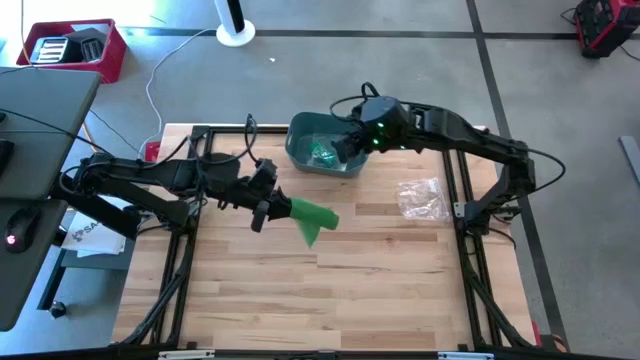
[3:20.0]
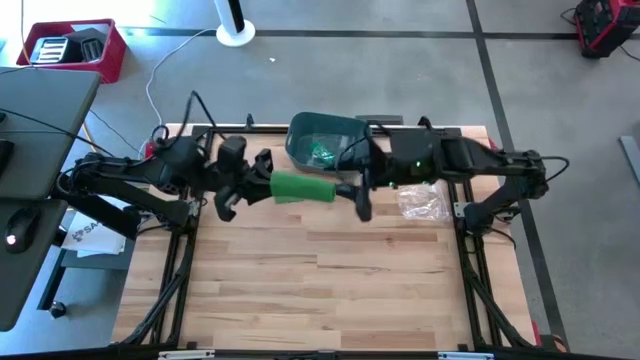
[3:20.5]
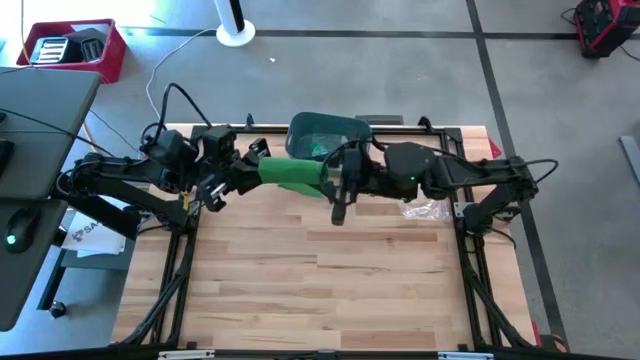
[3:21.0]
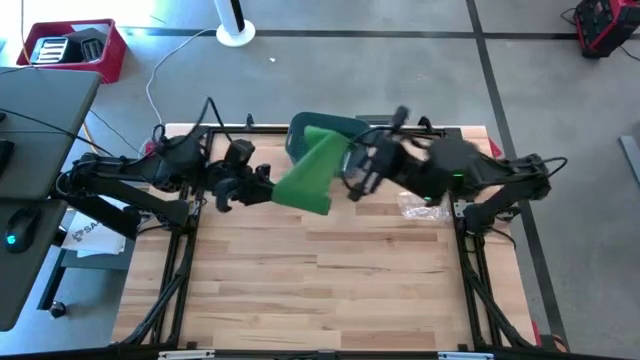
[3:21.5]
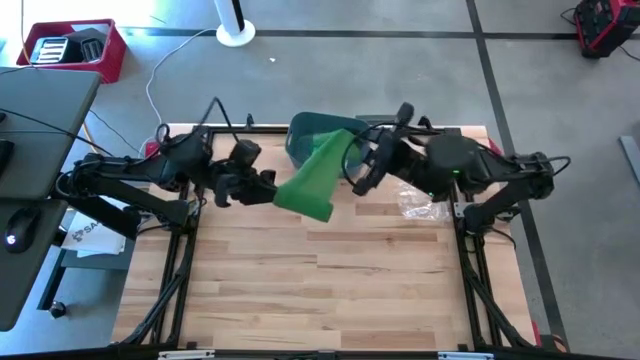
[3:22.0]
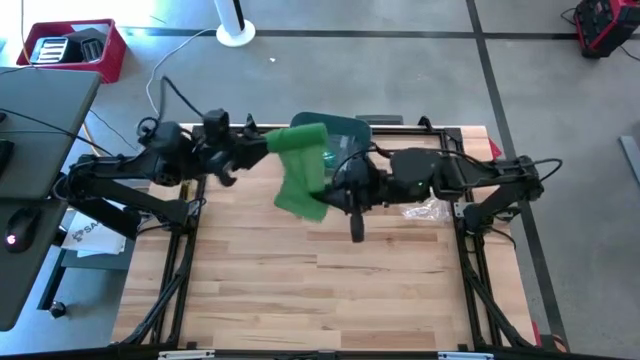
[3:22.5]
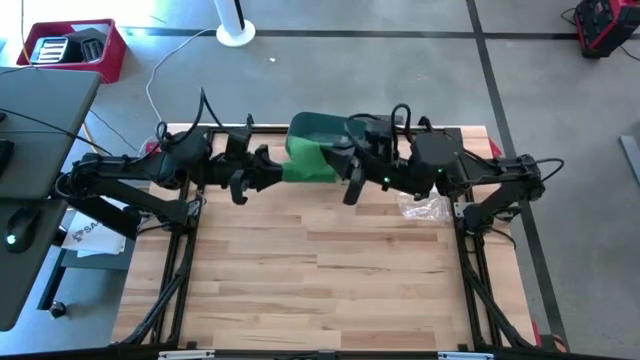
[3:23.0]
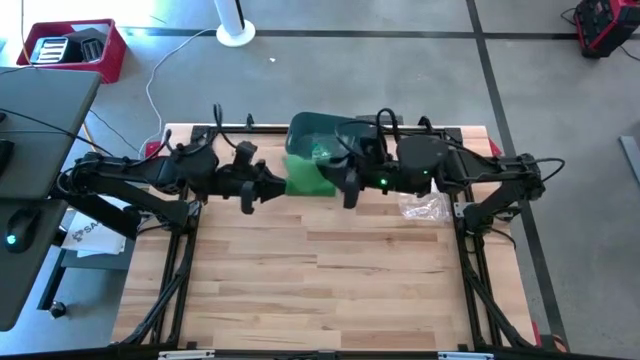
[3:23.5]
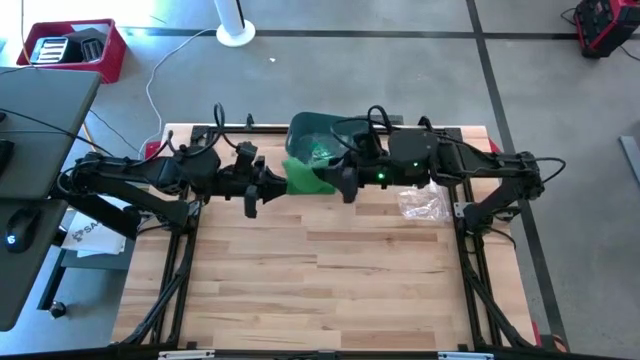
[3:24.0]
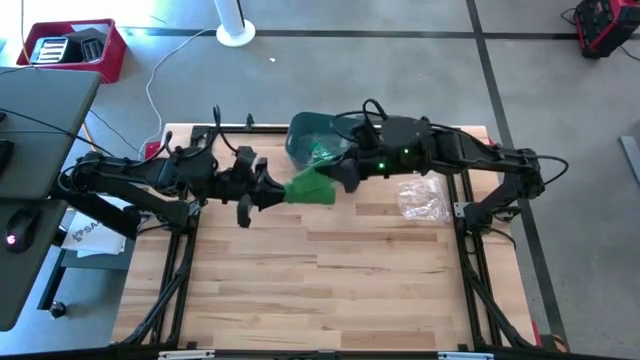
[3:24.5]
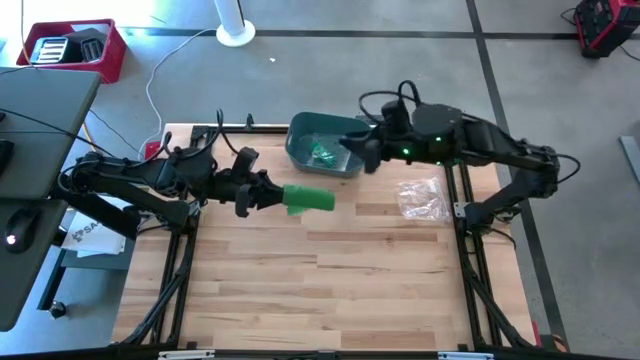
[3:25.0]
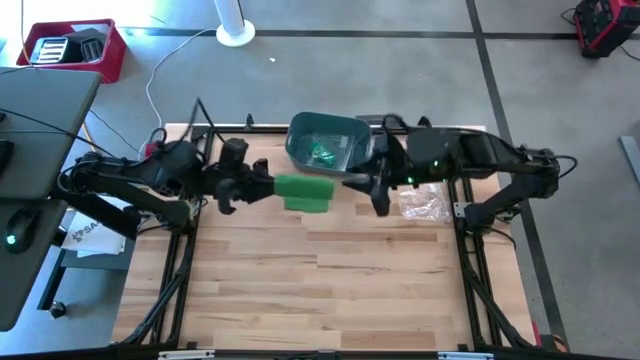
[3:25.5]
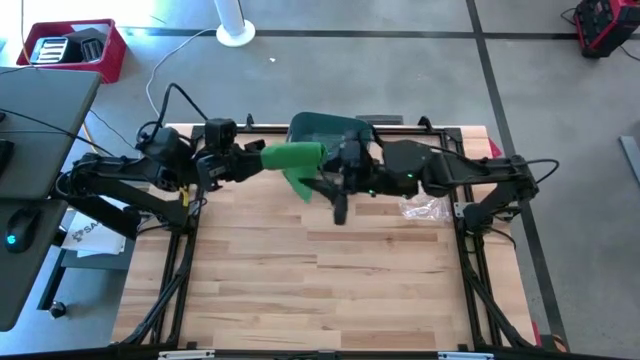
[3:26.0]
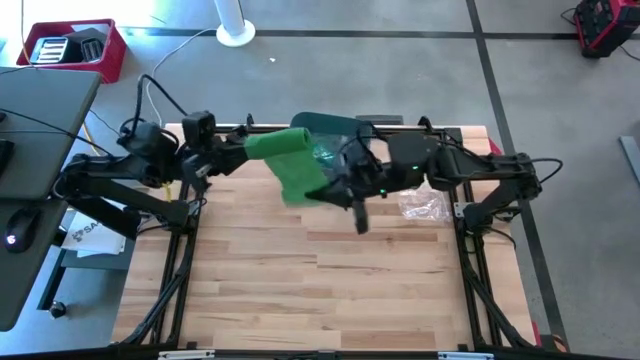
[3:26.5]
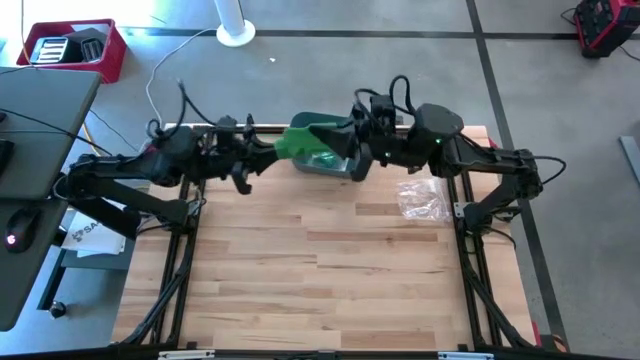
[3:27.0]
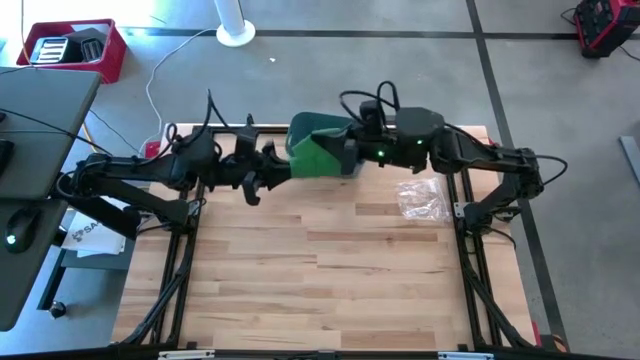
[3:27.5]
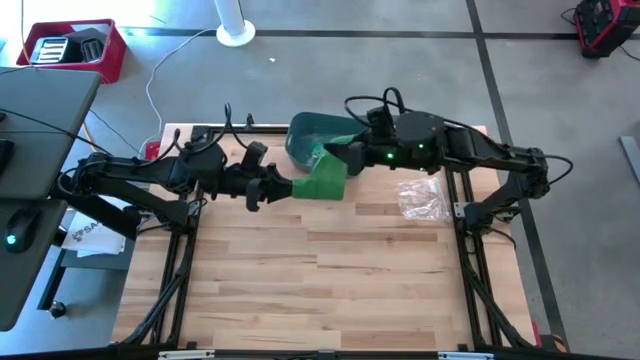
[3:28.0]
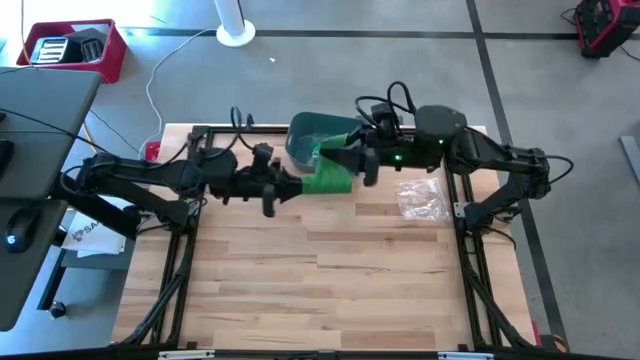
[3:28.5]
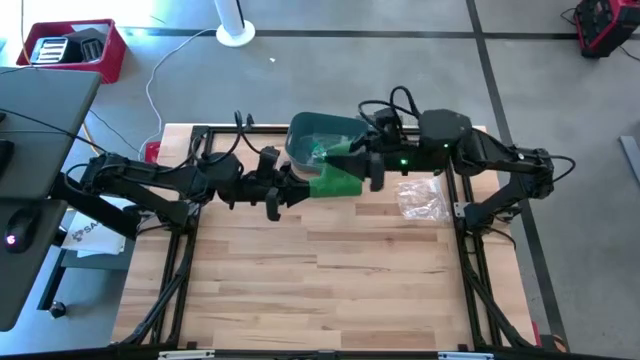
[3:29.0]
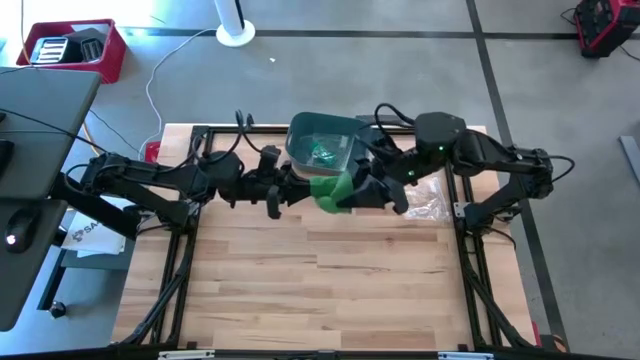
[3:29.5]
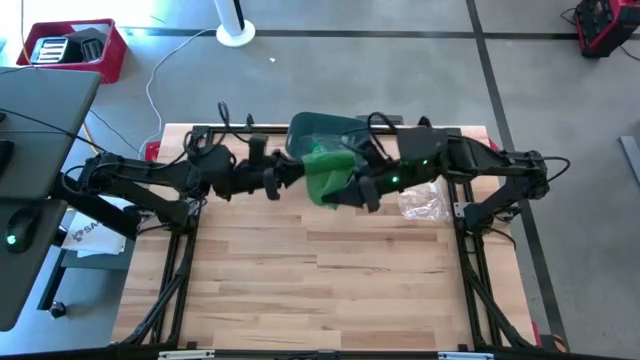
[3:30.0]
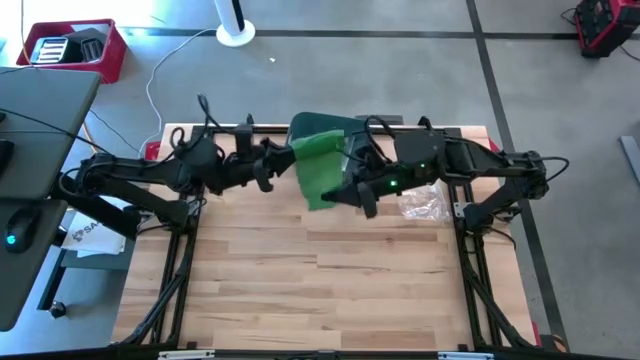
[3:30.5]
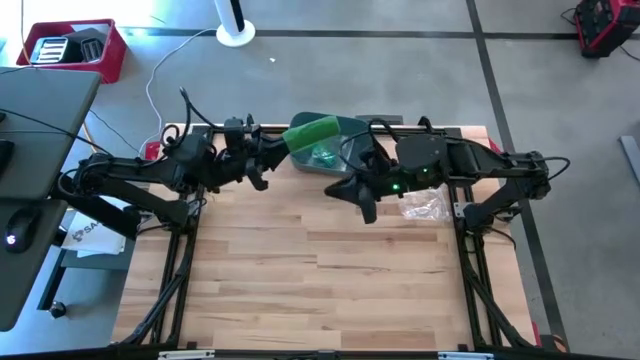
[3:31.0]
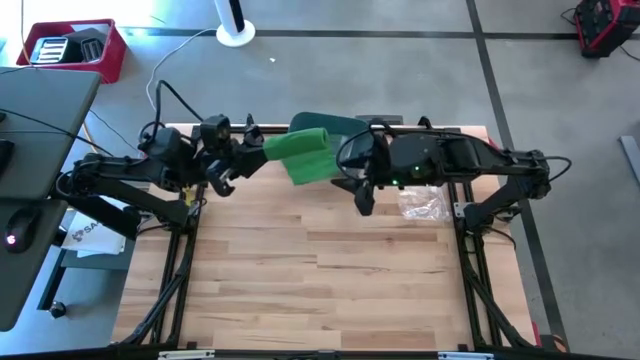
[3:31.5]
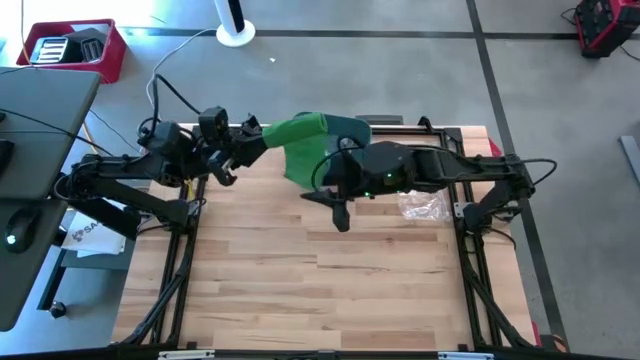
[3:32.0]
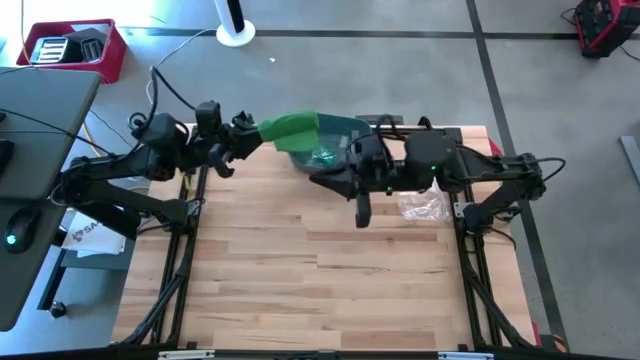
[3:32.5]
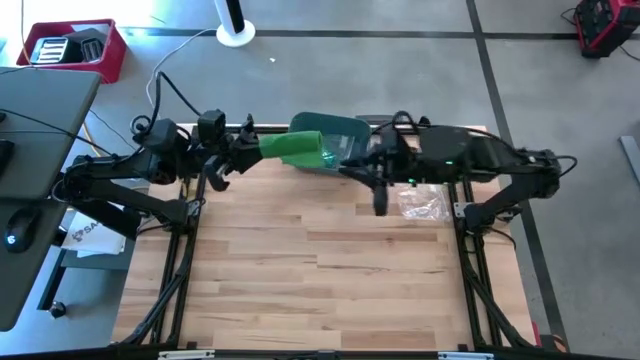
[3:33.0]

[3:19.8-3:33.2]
Task: Roll bandage
Roll the green bandage

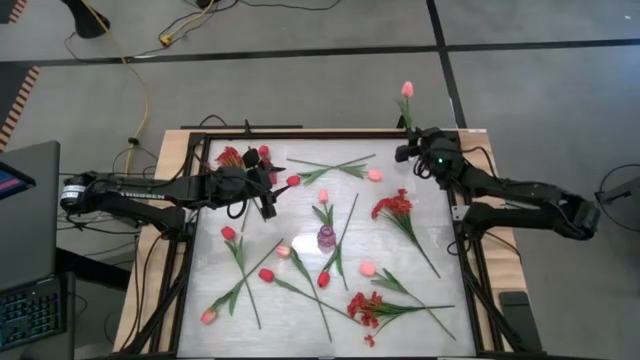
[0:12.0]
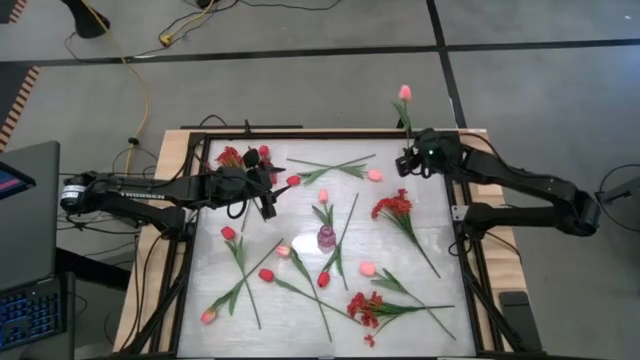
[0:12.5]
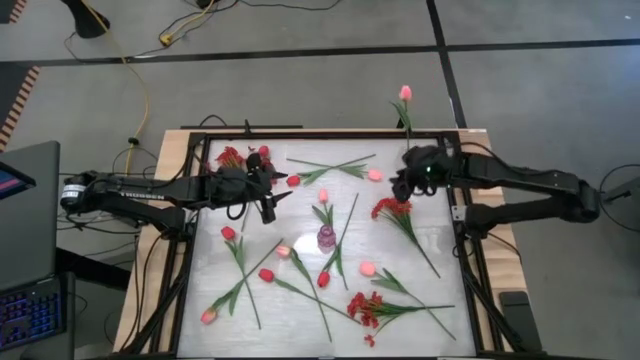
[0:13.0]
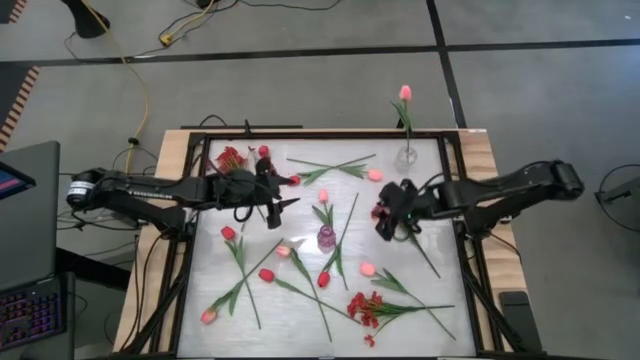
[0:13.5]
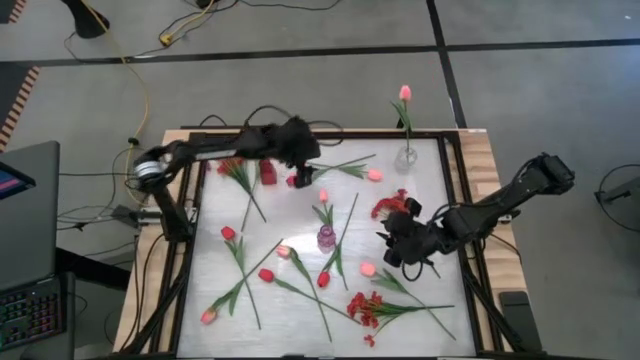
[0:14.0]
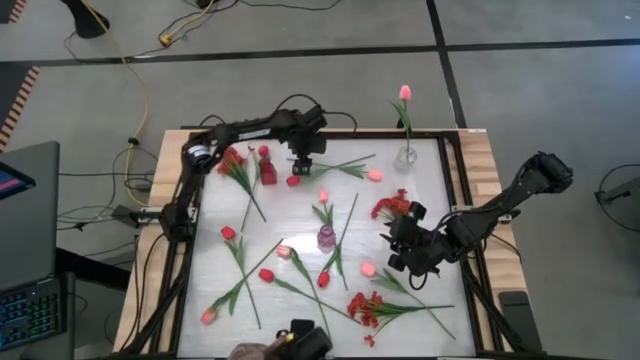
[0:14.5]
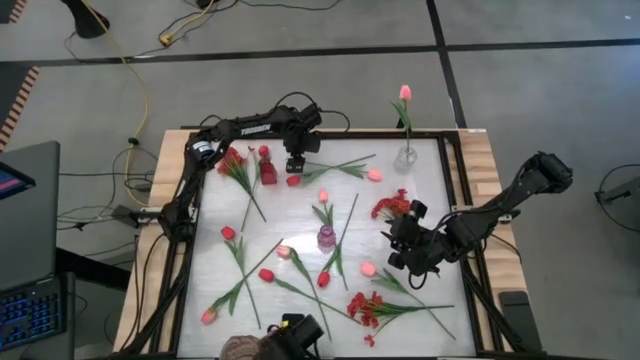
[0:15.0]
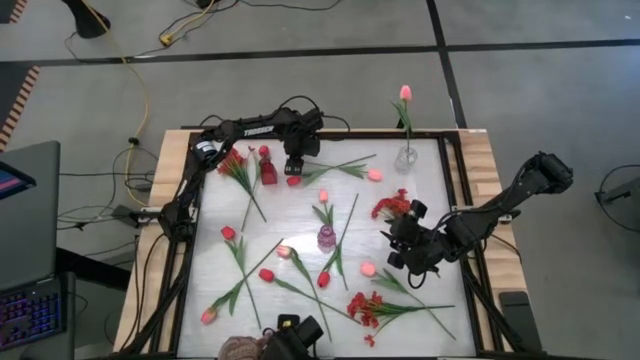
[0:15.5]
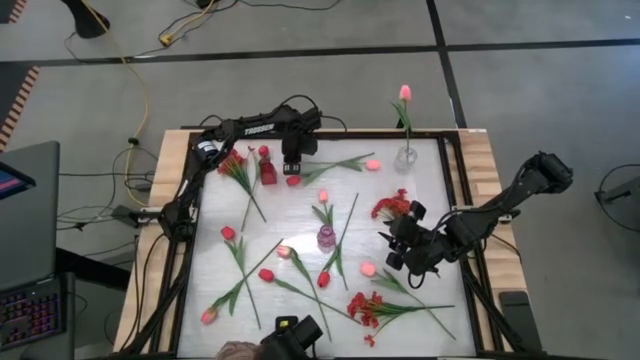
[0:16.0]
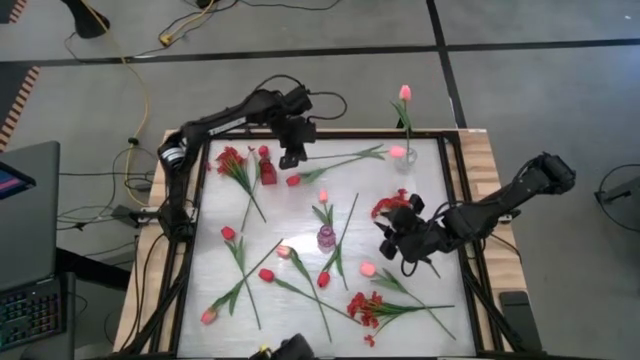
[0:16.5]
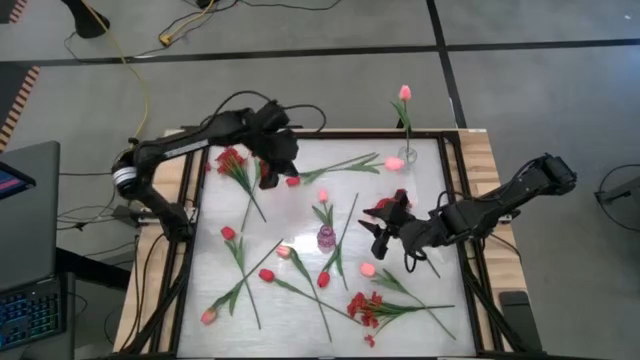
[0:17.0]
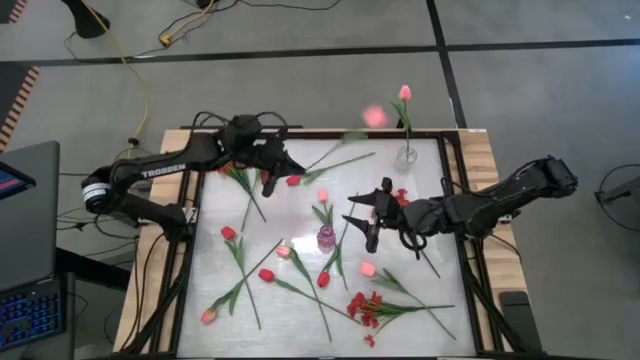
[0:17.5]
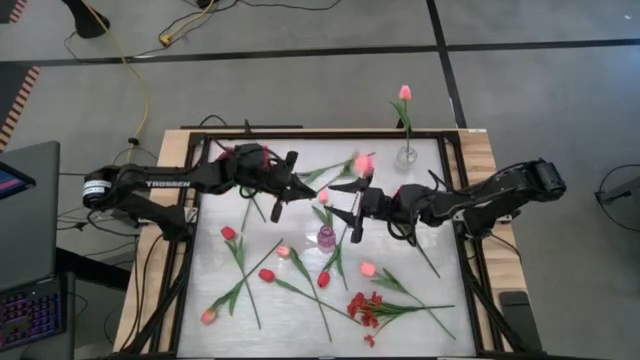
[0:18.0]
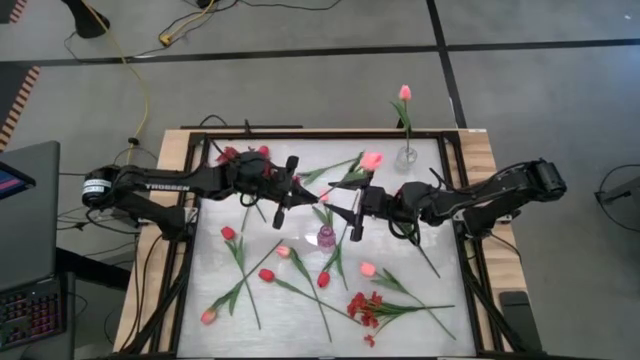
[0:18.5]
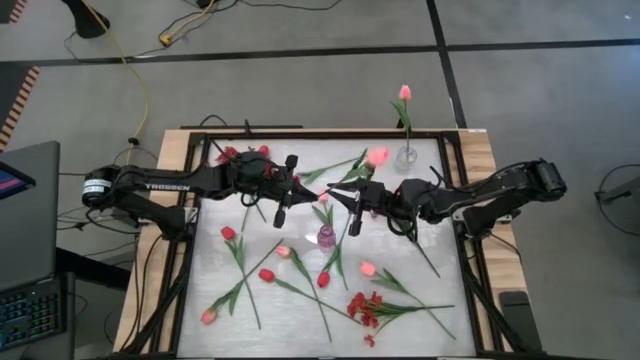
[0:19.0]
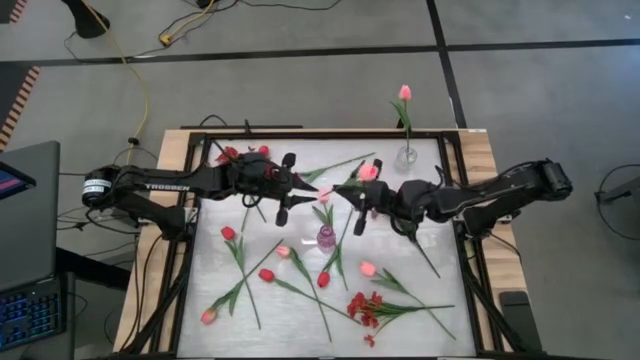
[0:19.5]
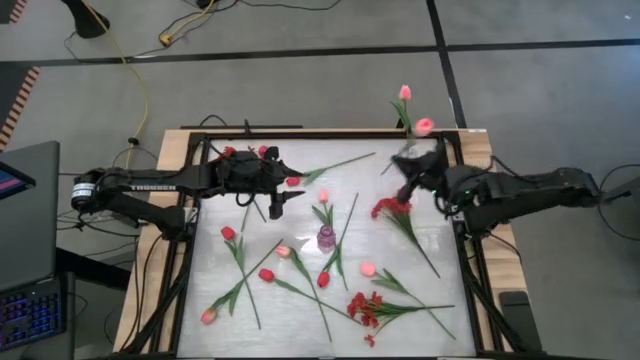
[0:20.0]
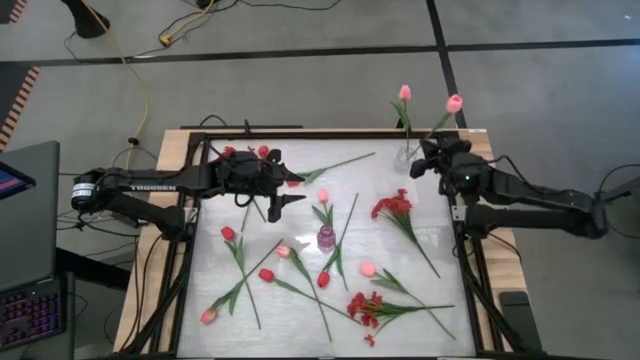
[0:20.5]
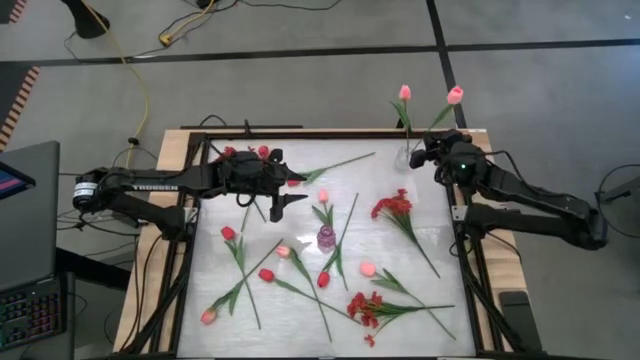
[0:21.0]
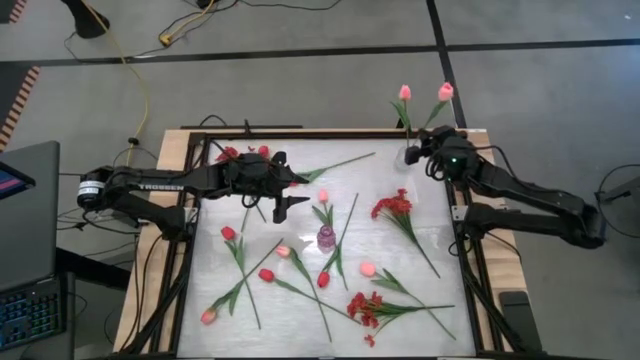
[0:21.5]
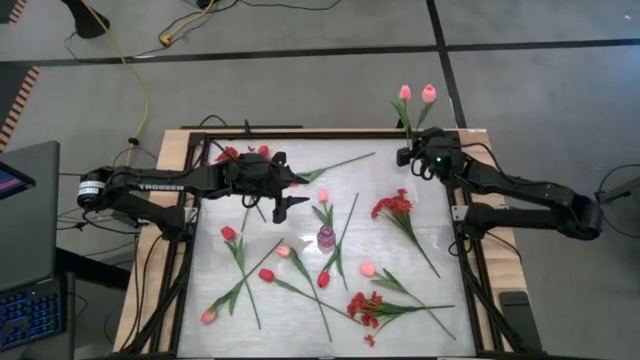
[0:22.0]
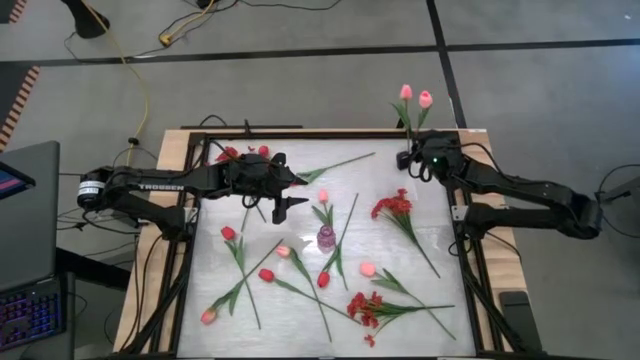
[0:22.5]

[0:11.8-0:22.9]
Task: Sort flowers into vase by color
Put the pink flower into the transparent vase
